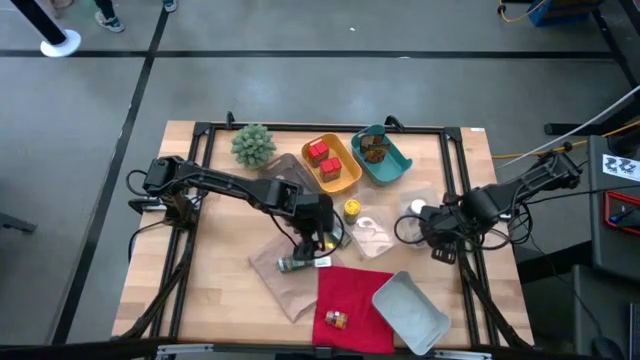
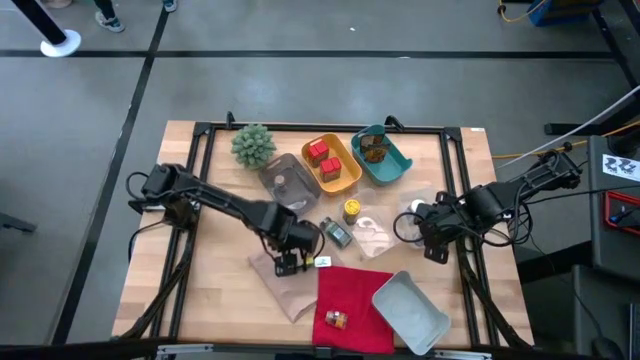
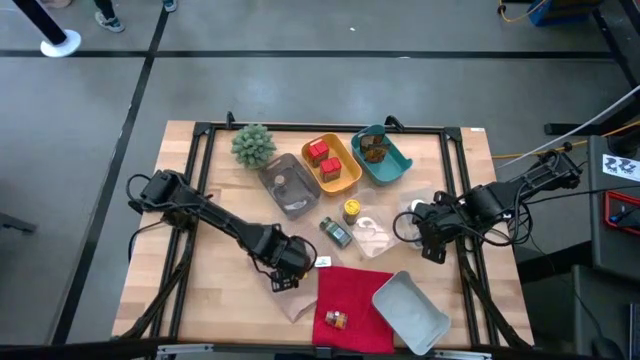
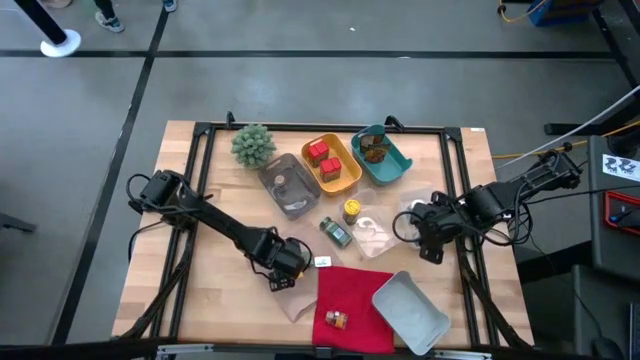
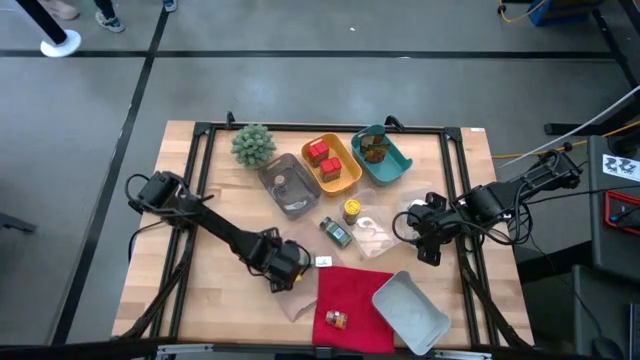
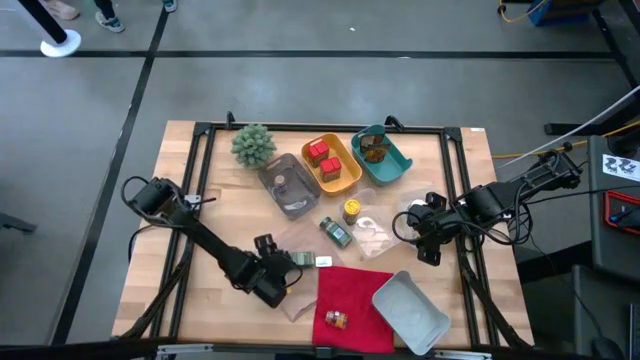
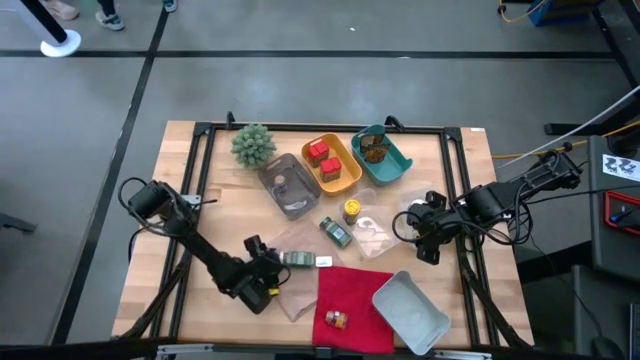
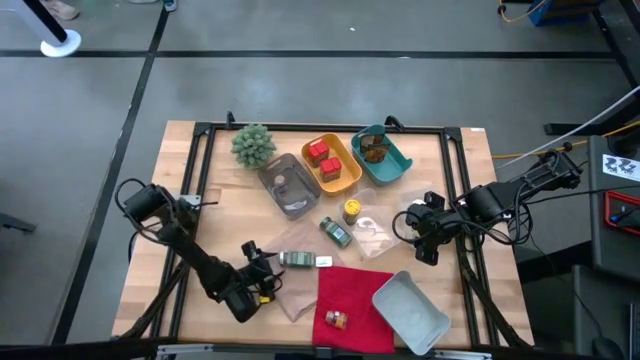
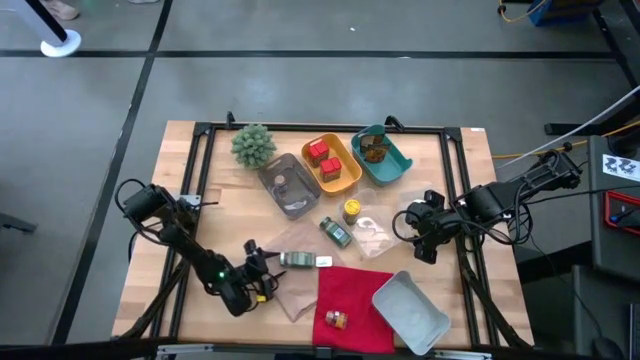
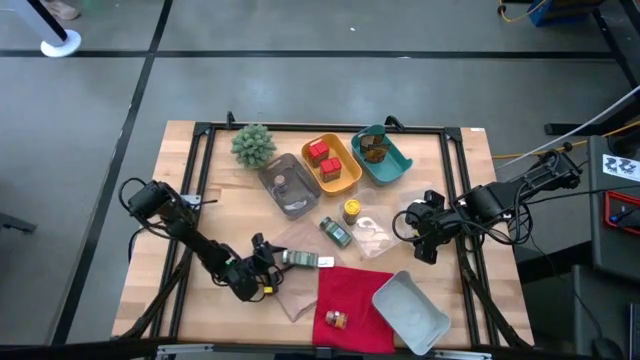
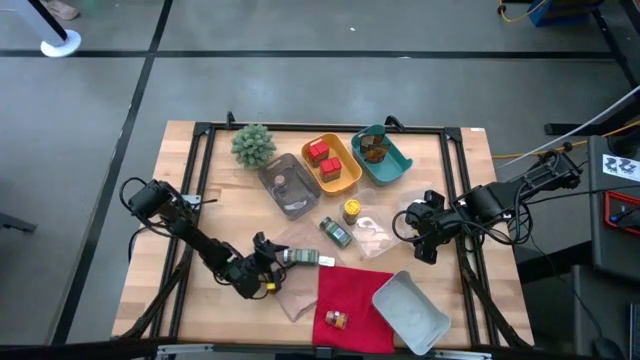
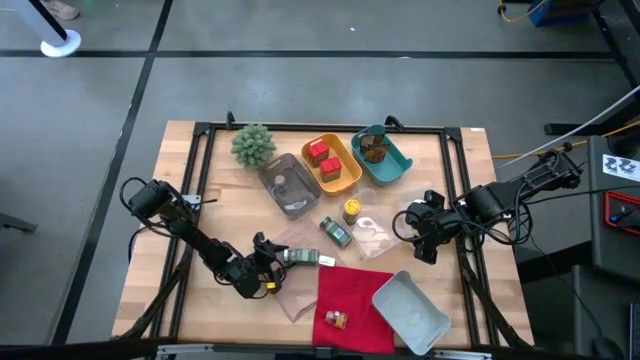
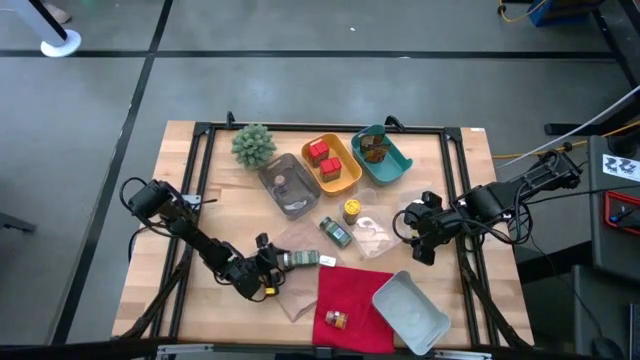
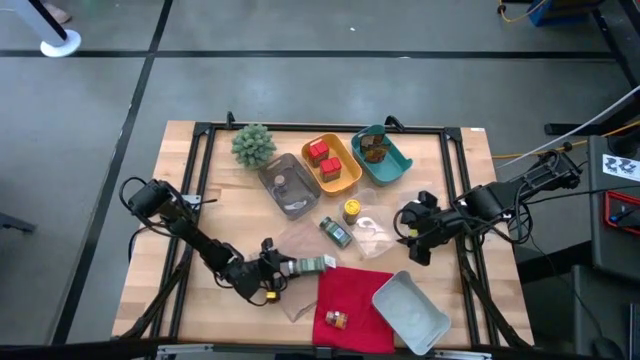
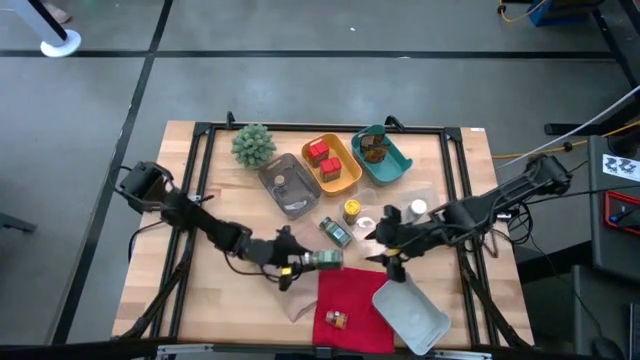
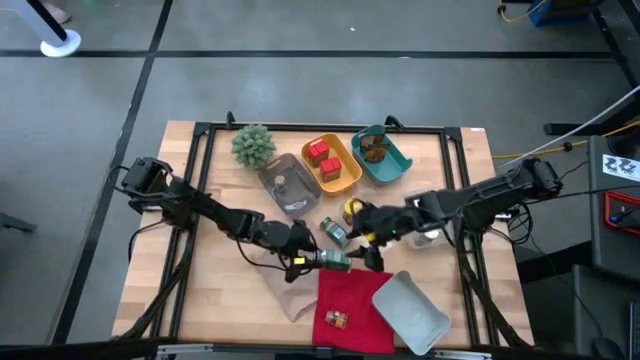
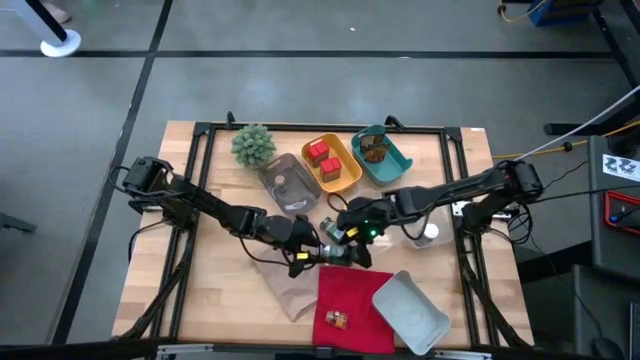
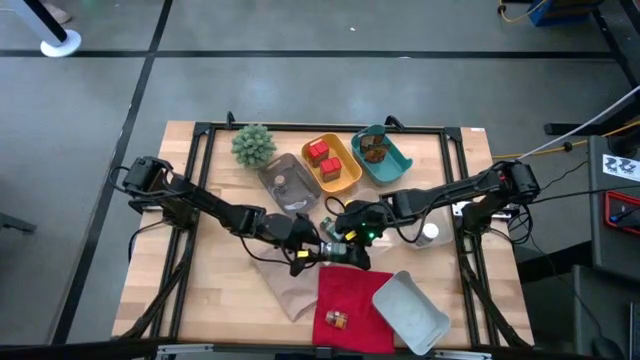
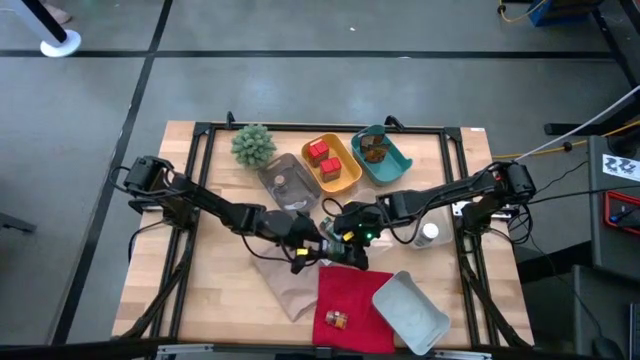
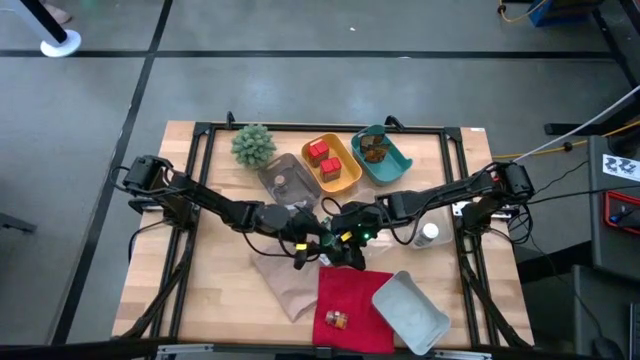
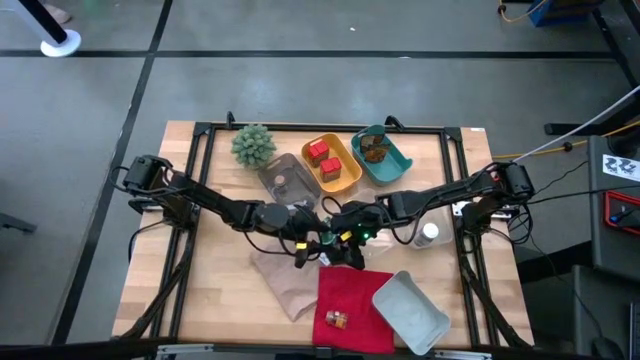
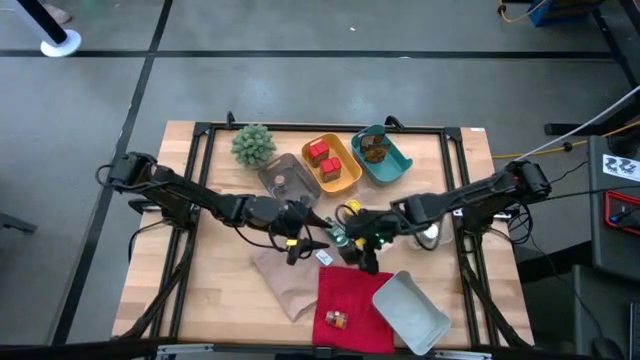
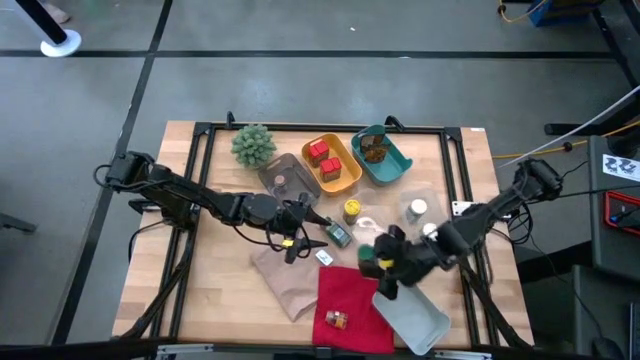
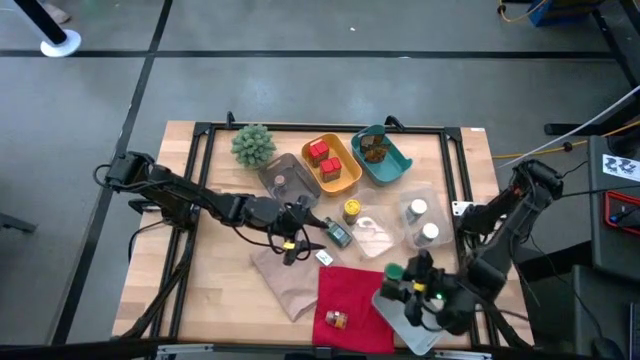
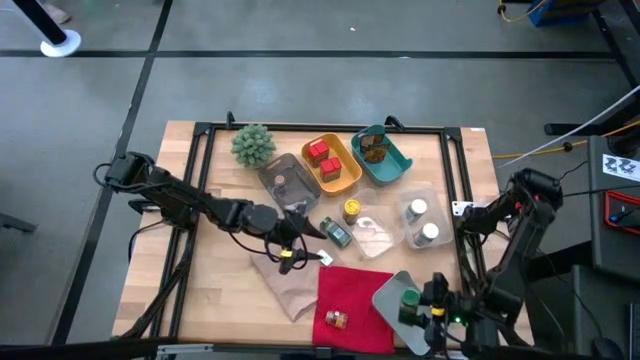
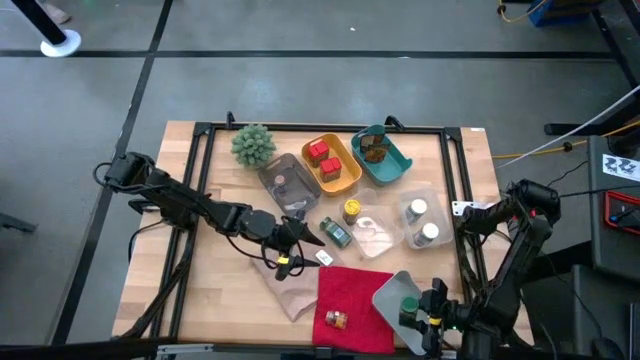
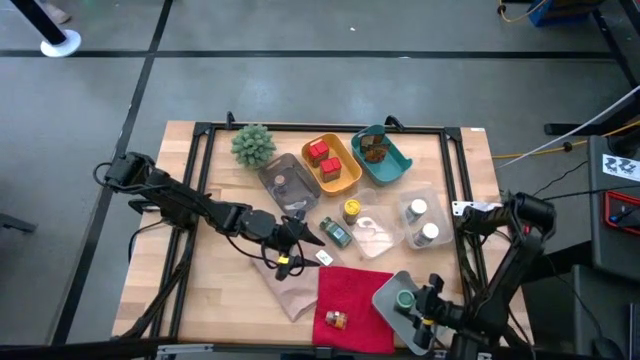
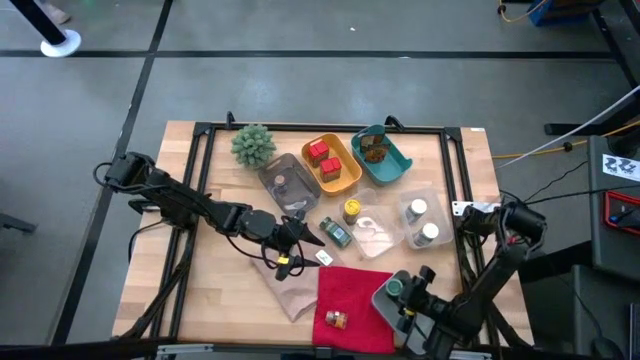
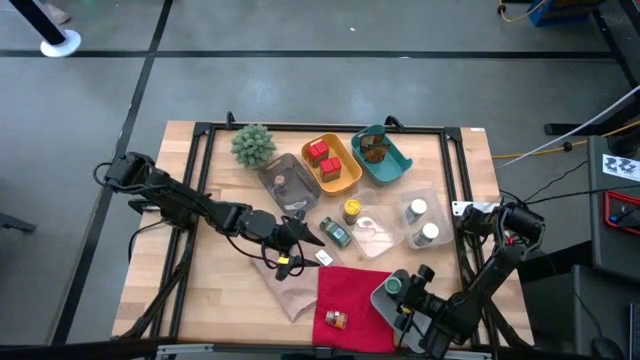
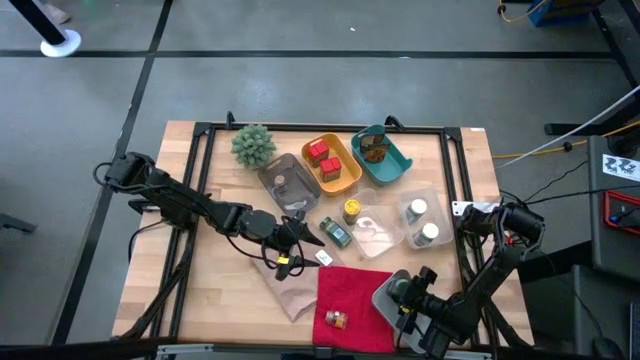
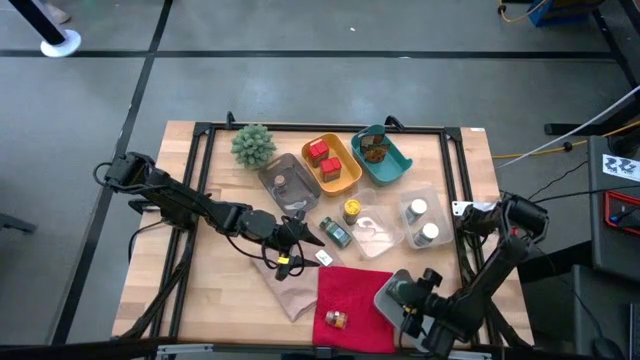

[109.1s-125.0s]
Task: Sort spices by type
Put the left green seasoning bottle into the gray bin

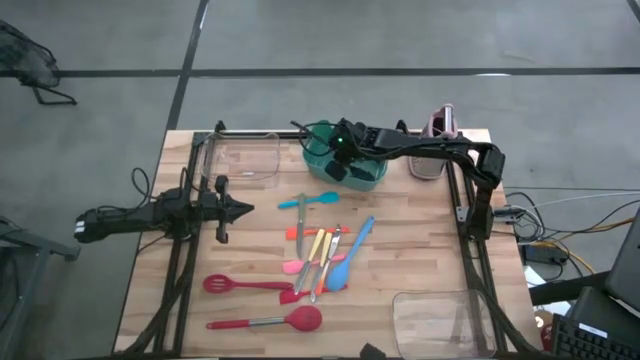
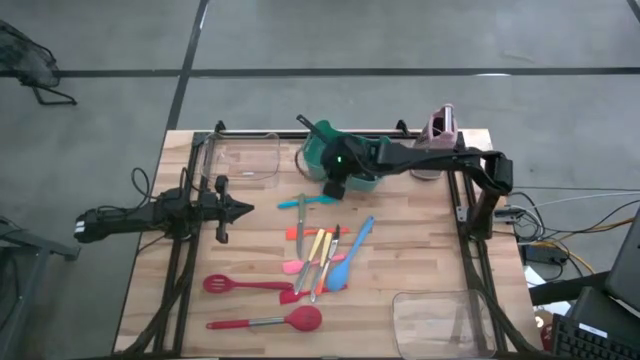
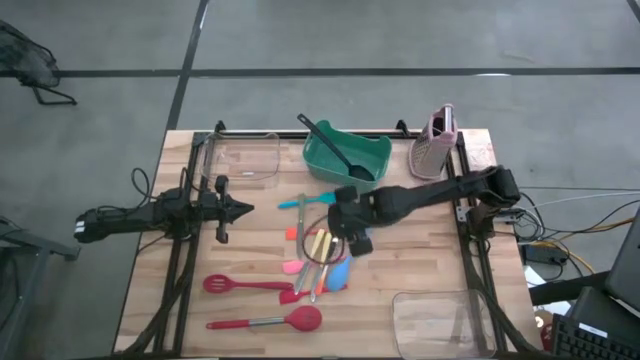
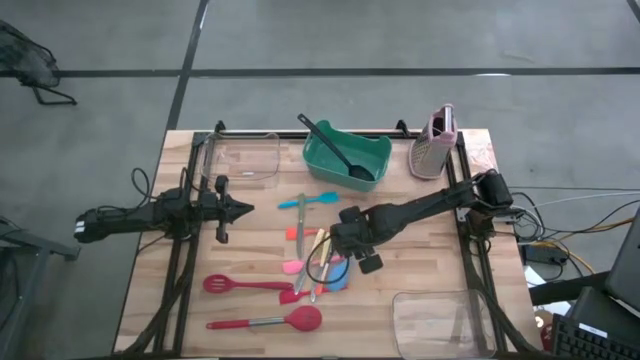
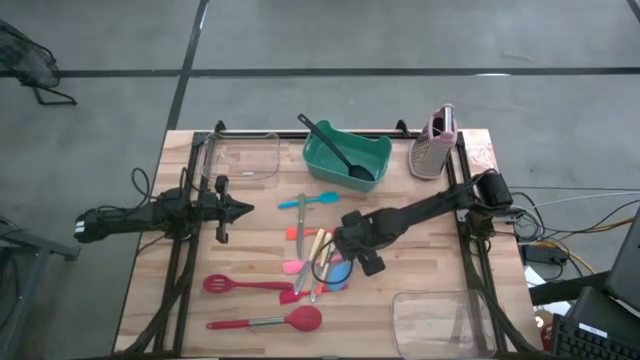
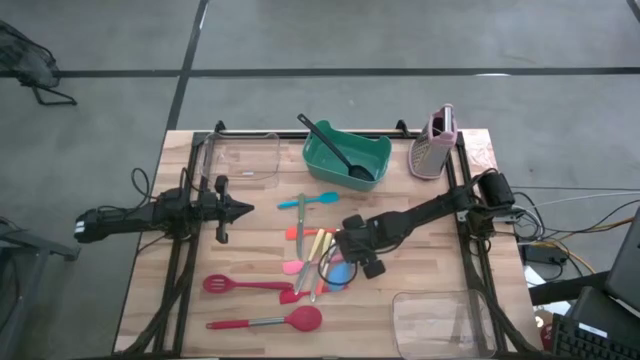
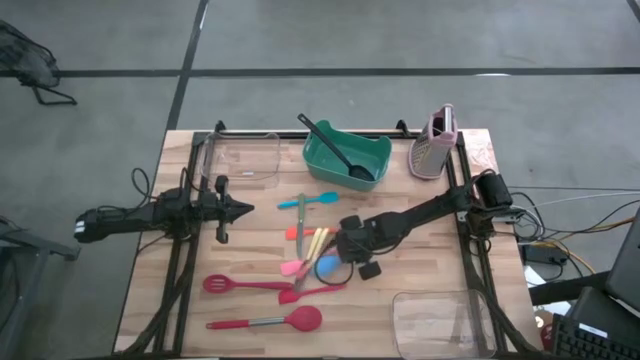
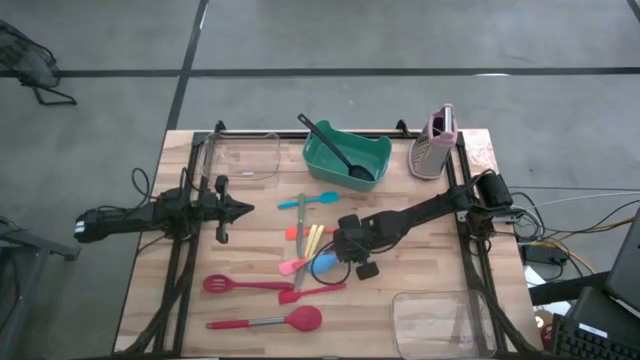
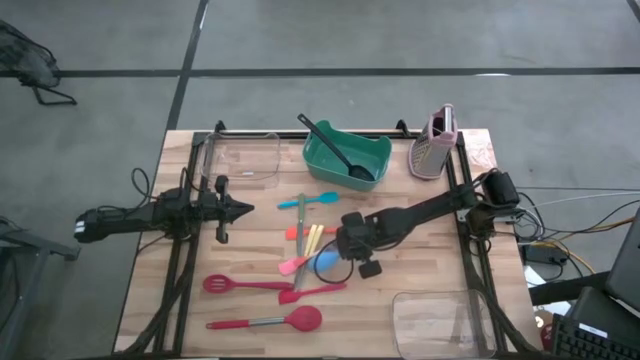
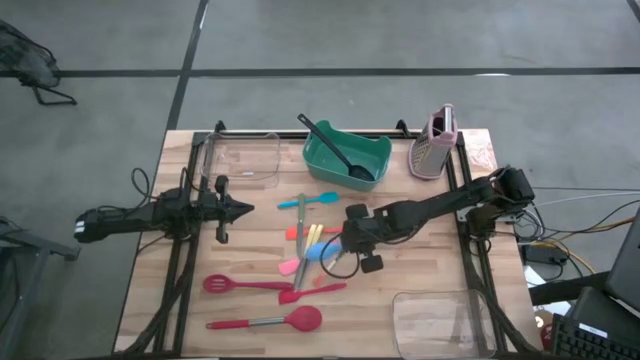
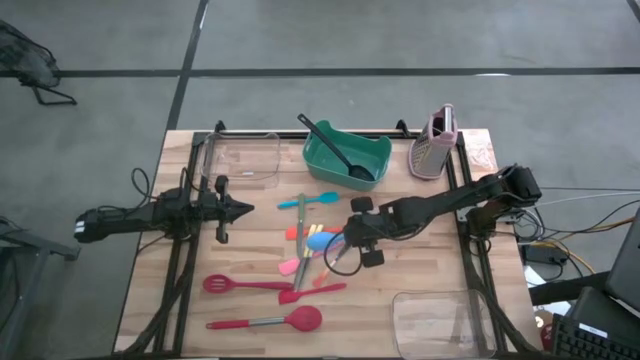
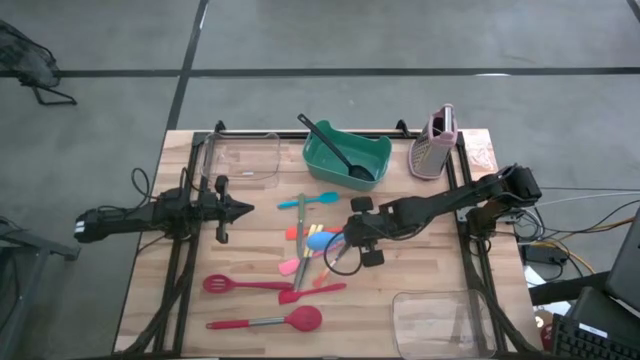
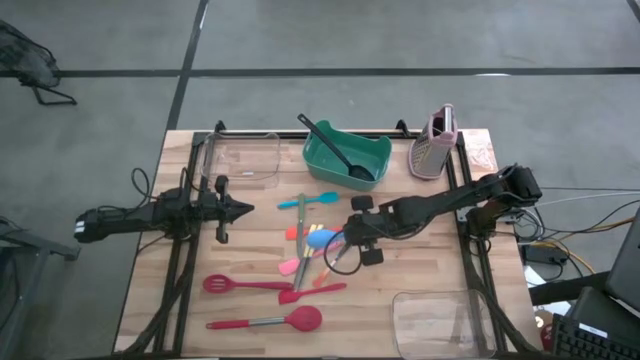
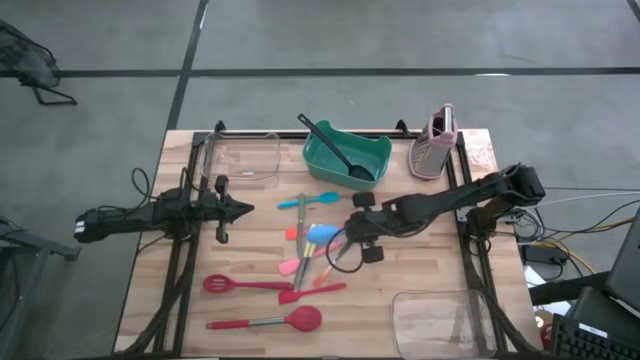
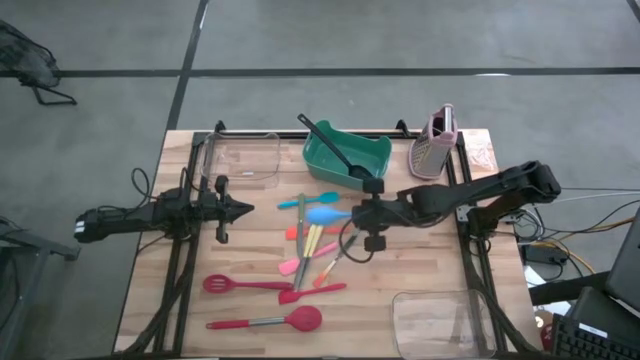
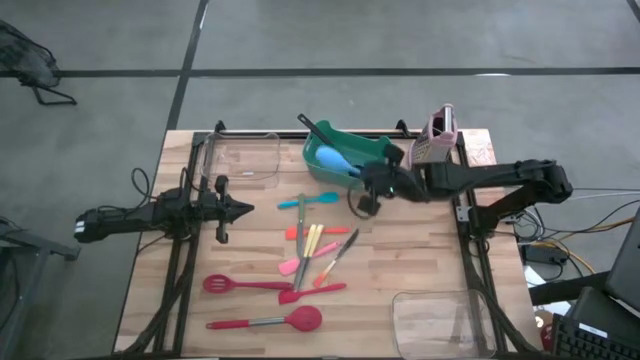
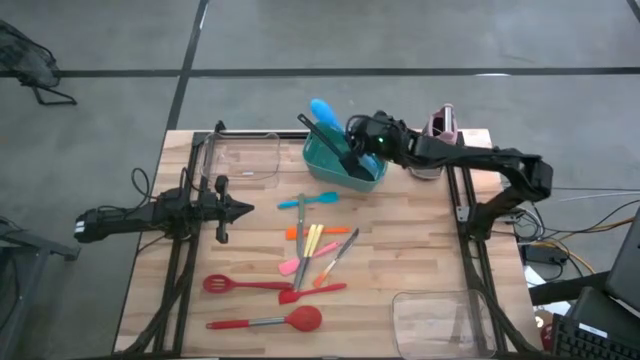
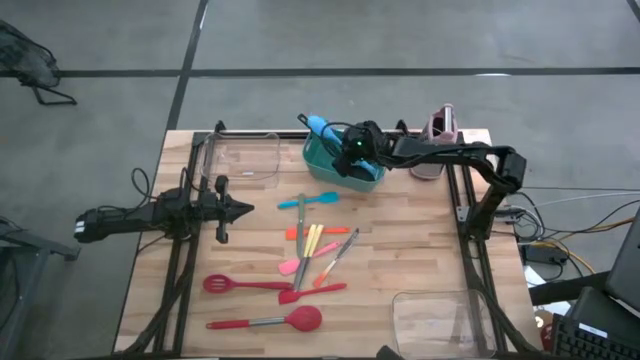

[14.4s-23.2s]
Task: Pick & Place Kitchen Items
Put the blue serving spoon into the green bin
